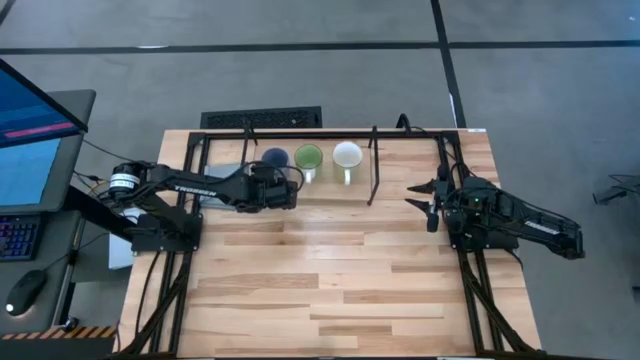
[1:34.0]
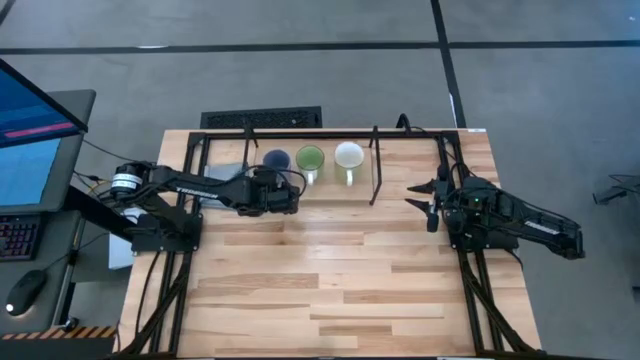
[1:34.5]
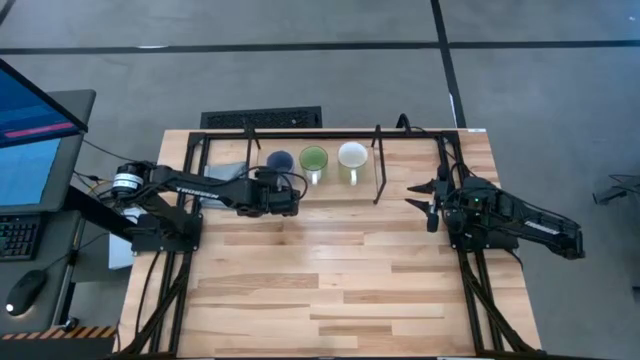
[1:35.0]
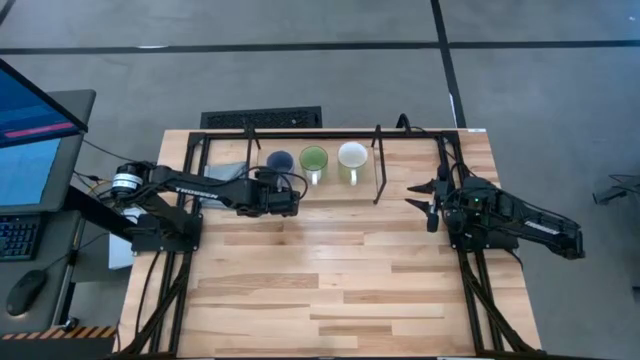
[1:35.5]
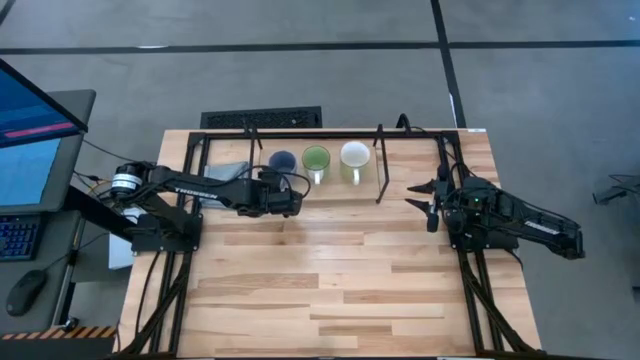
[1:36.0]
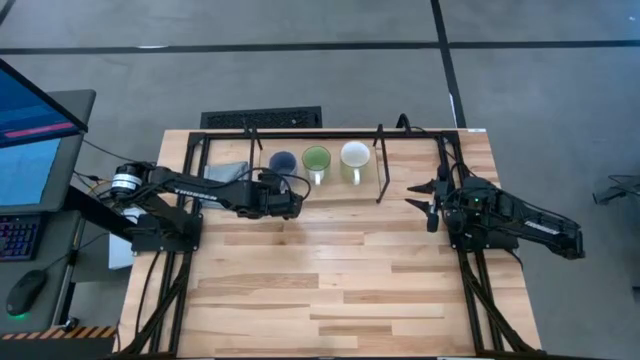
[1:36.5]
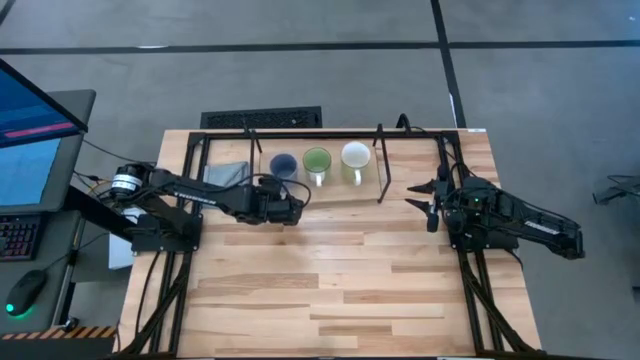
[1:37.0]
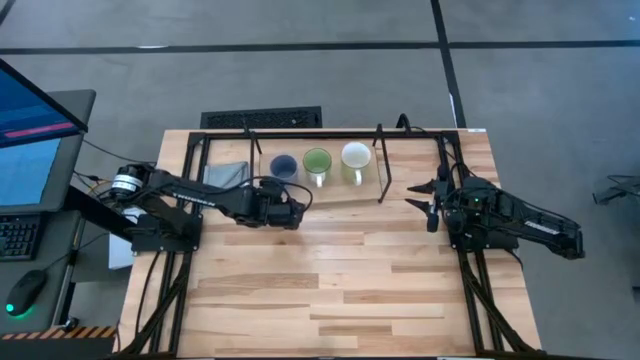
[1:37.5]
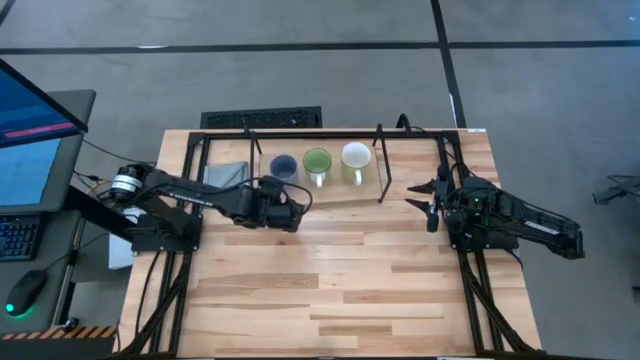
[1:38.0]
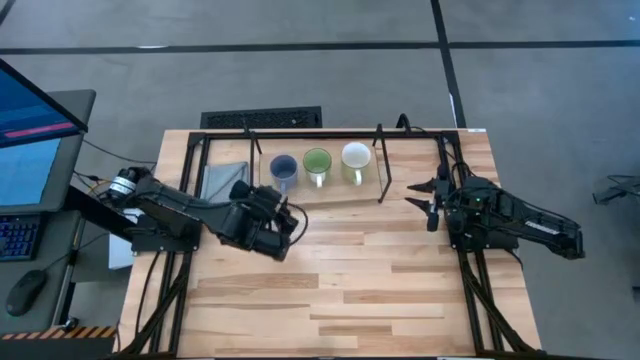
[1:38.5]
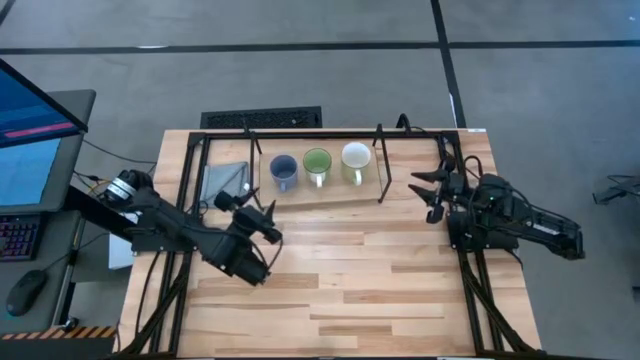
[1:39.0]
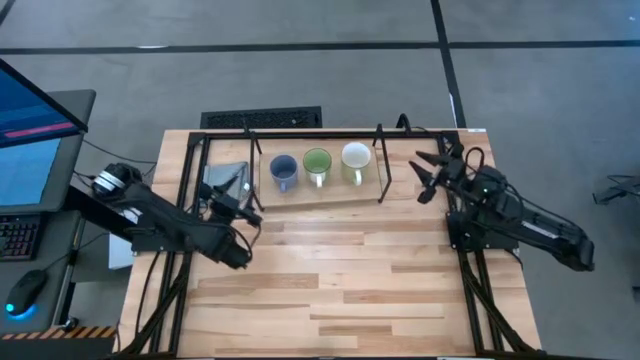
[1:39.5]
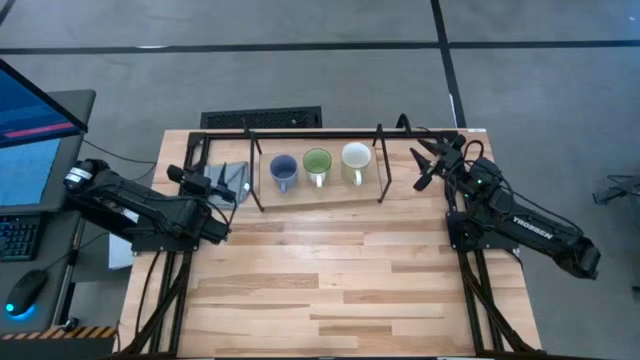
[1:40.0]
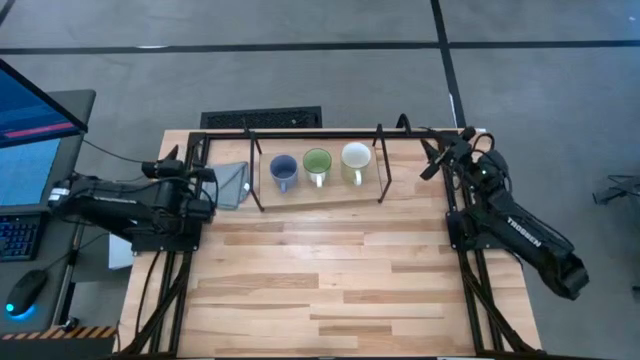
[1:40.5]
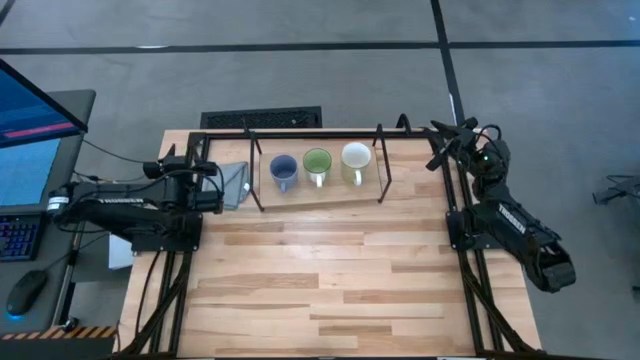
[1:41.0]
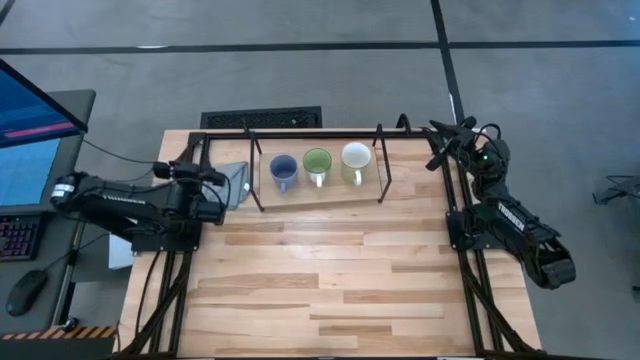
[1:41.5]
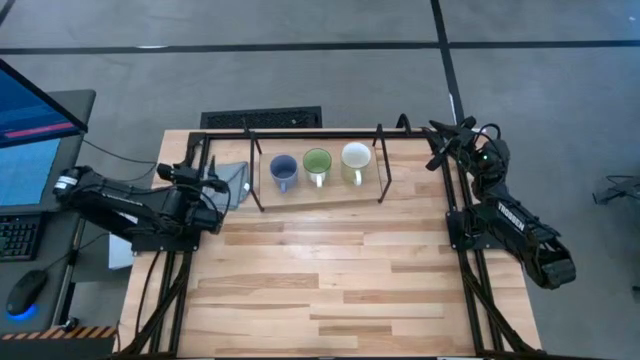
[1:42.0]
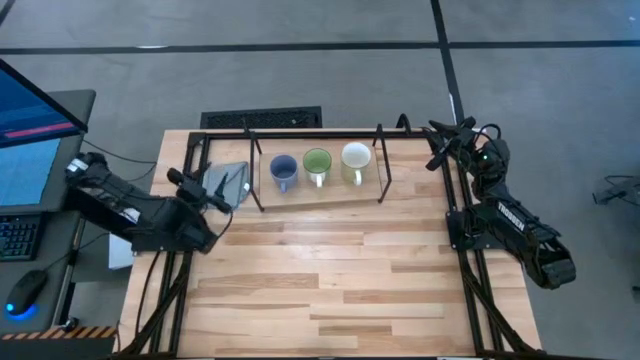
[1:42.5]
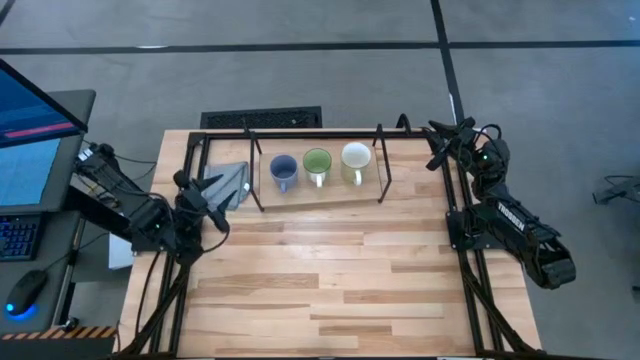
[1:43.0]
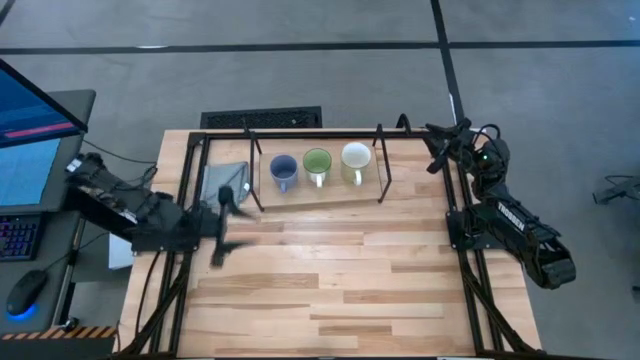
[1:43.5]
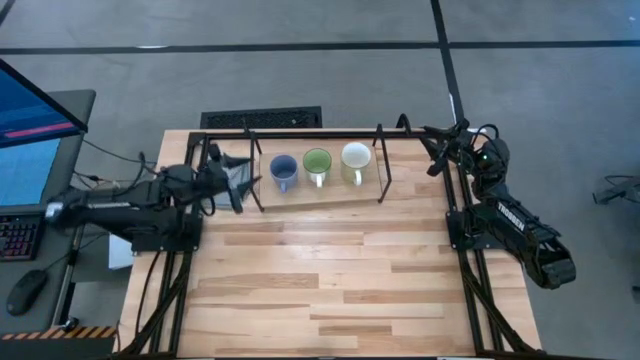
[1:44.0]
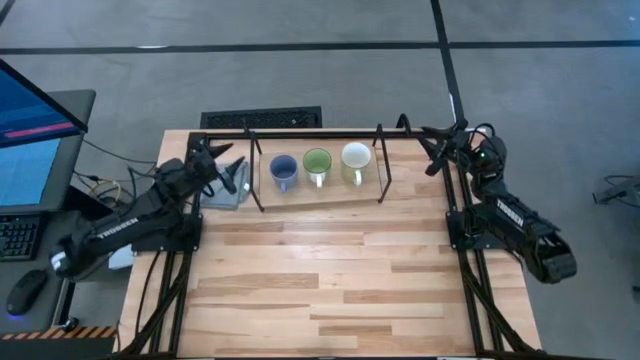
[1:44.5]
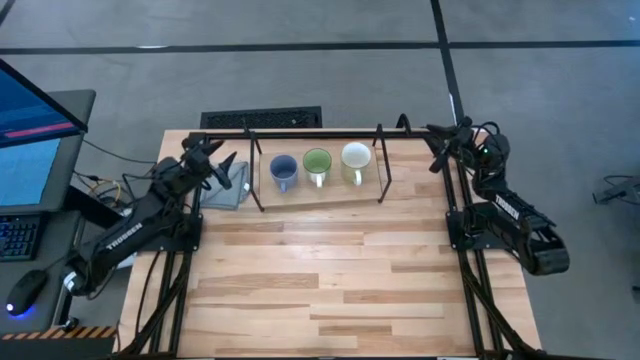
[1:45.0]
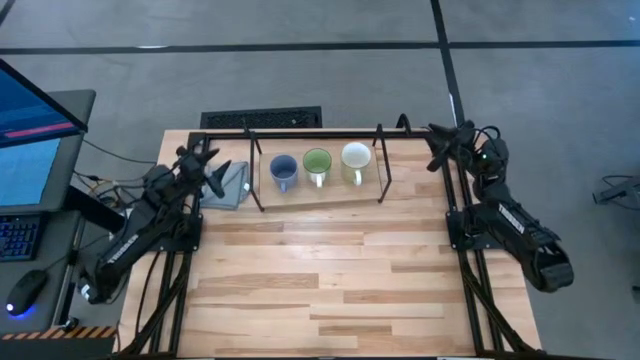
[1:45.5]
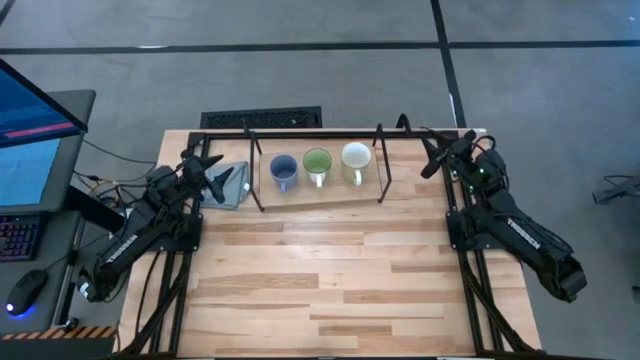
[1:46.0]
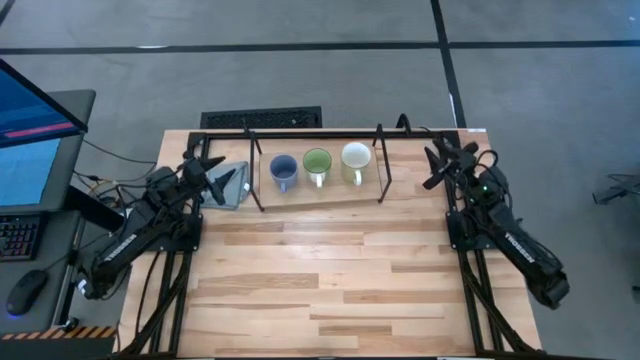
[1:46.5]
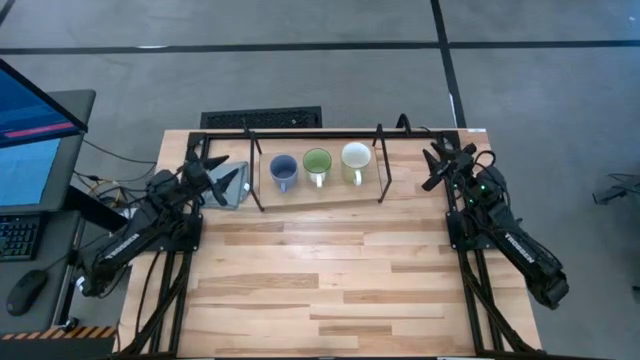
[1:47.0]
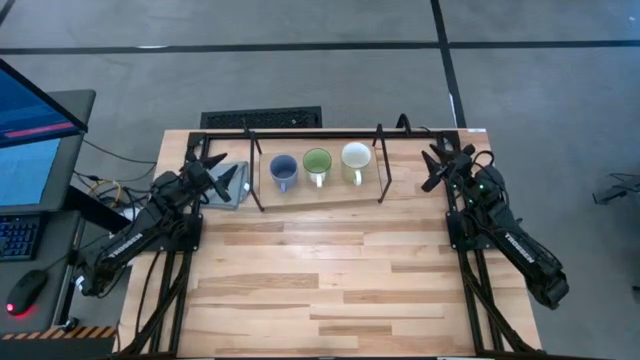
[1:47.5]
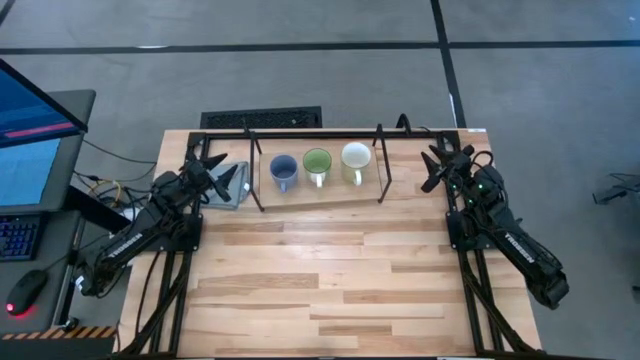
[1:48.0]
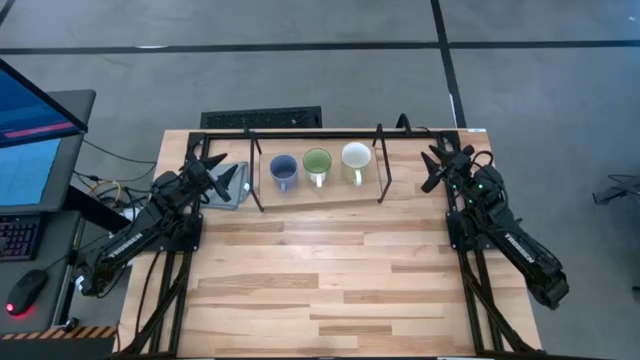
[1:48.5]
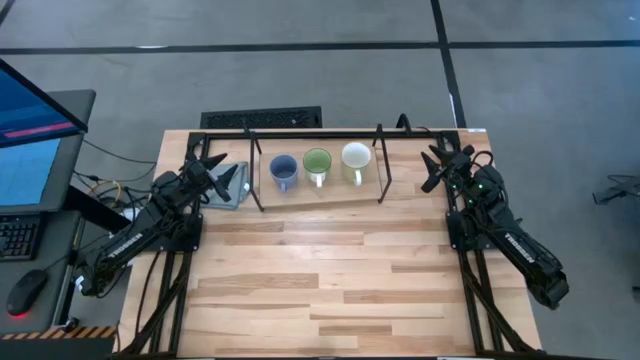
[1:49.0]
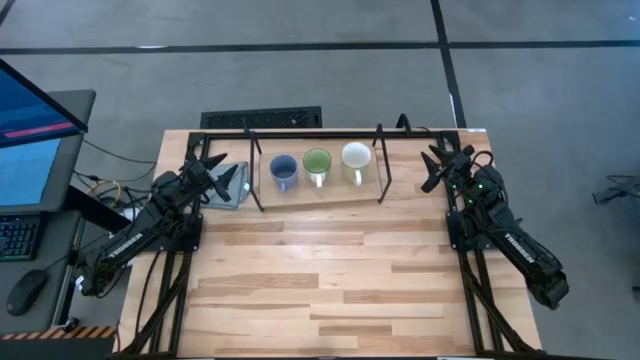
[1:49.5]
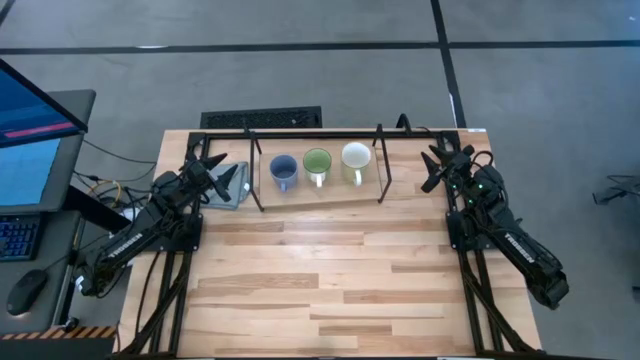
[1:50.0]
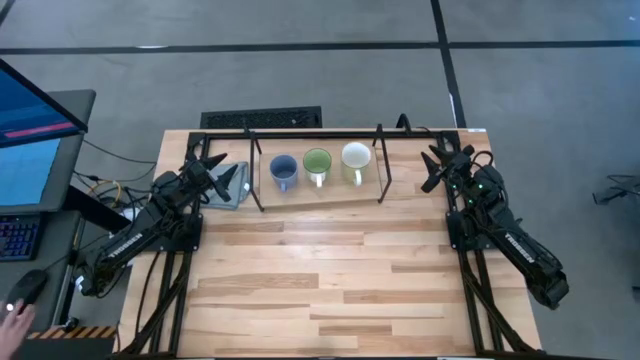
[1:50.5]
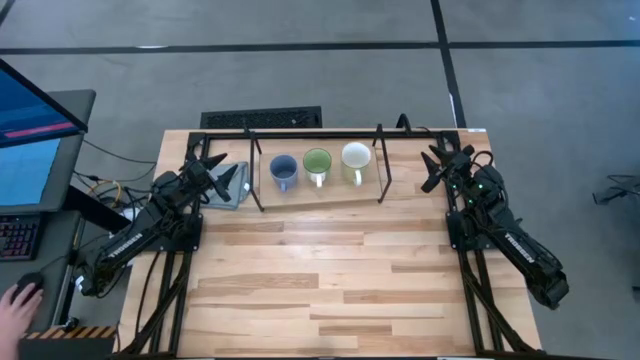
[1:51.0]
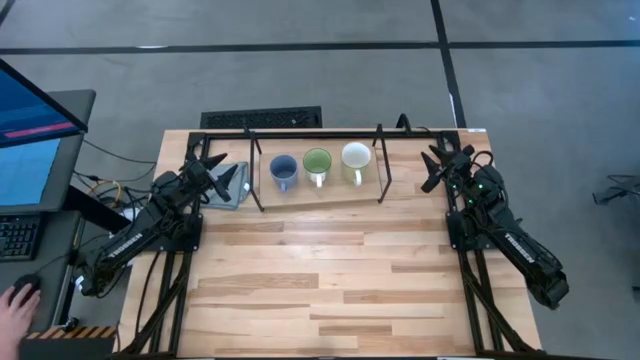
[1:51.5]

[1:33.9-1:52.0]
Task: Stack small to large cups/mugs on shelf
Return to home position

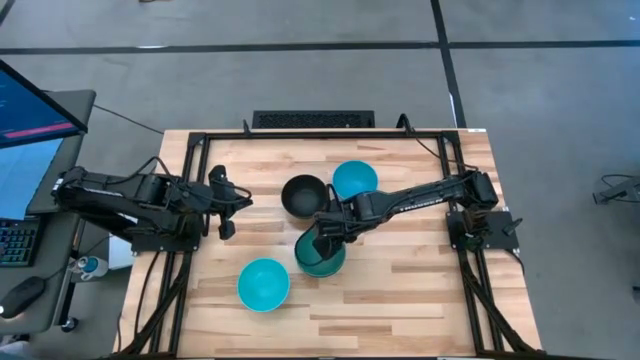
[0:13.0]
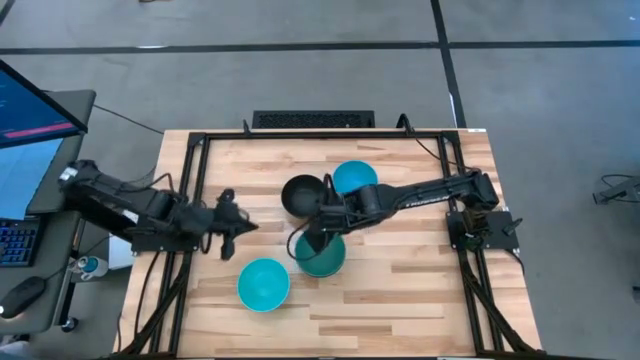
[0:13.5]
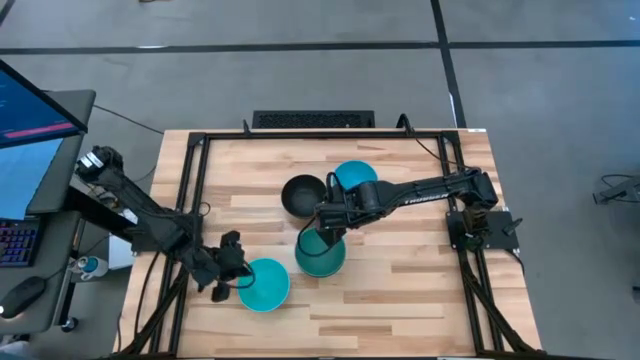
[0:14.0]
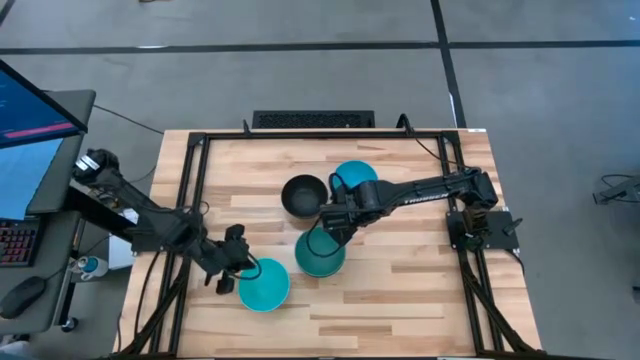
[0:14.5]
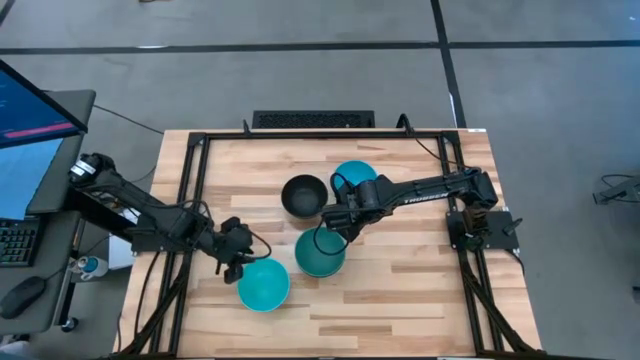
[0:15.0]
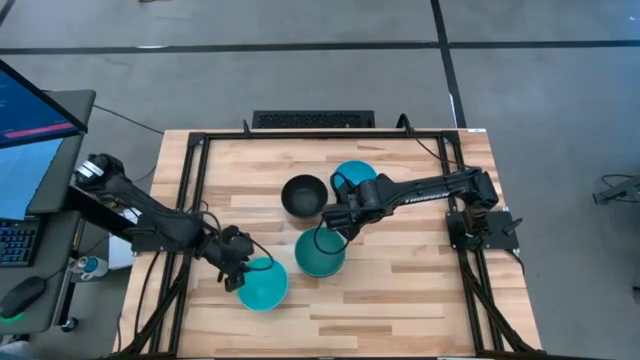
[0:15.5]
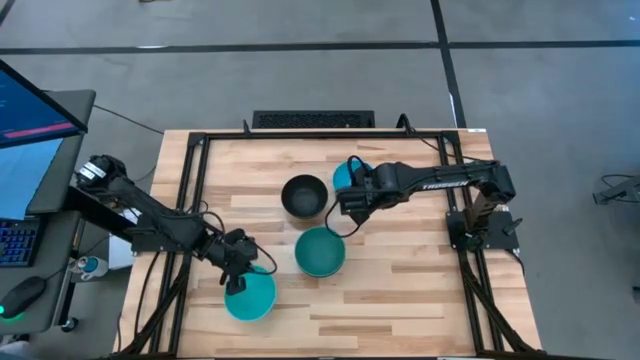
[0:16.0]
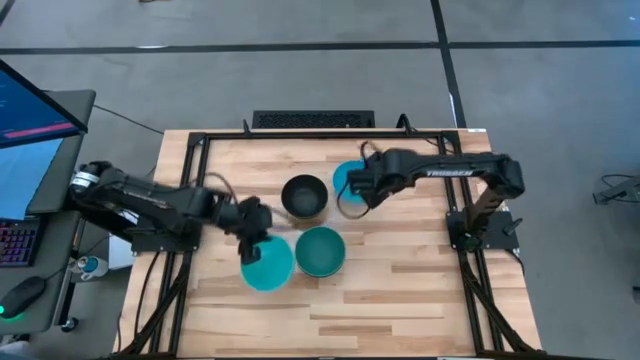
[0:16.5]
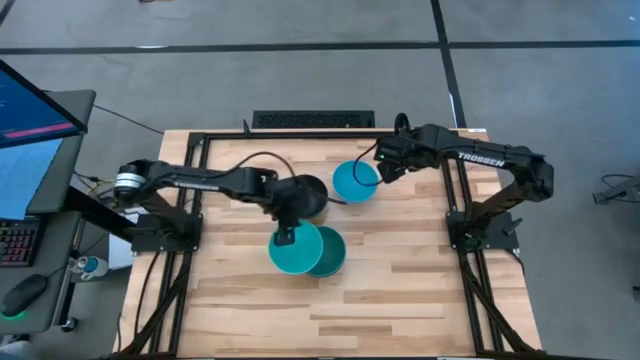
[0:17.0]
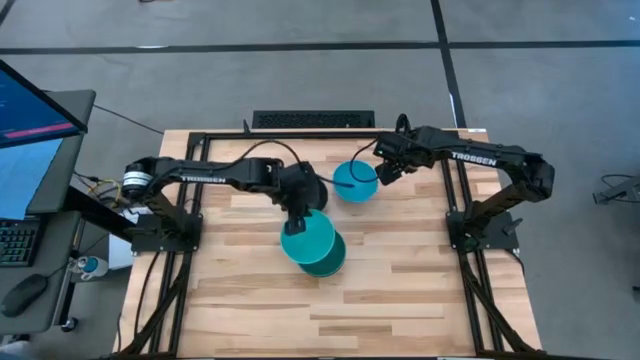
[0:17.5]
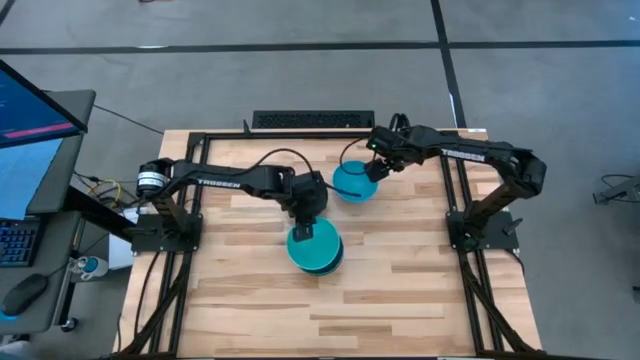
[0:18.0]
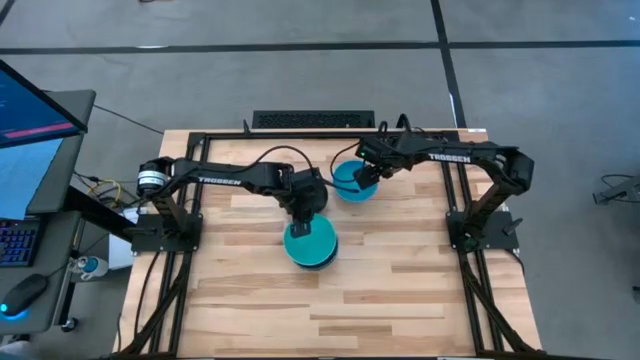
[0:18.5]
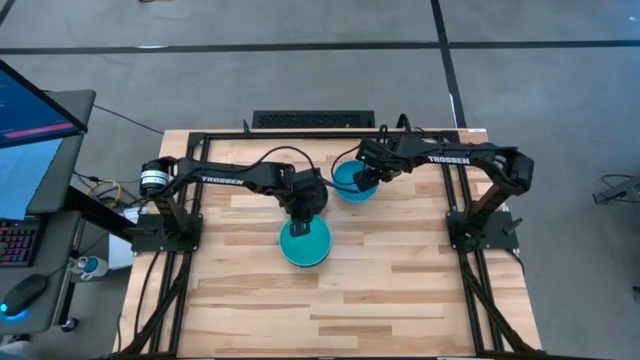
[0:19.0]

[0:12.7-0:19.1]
Task: Nest bowls inside each other
Stack the bottom blue bowl on top of the green bowl
